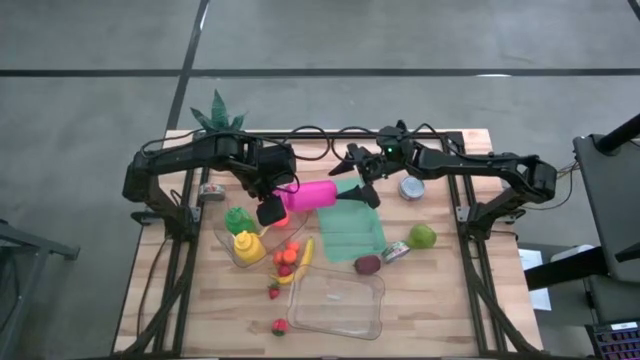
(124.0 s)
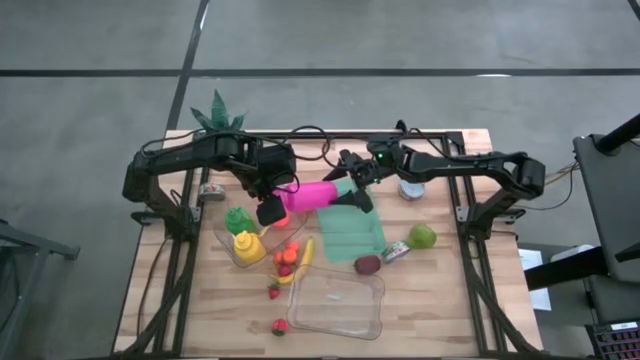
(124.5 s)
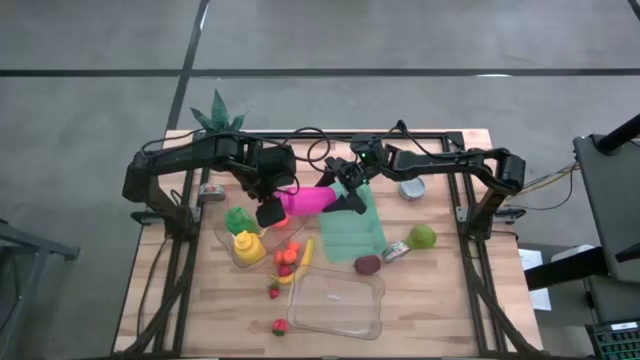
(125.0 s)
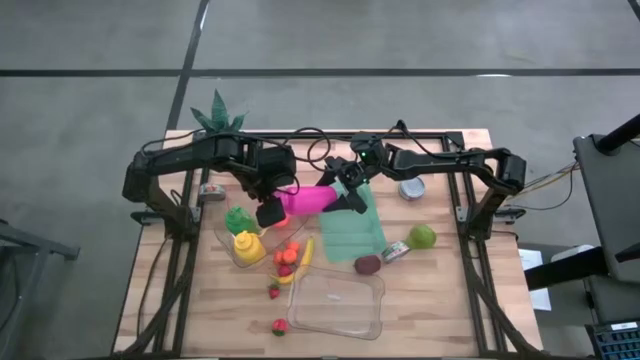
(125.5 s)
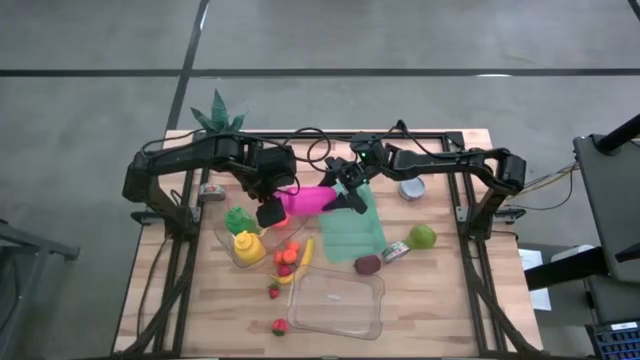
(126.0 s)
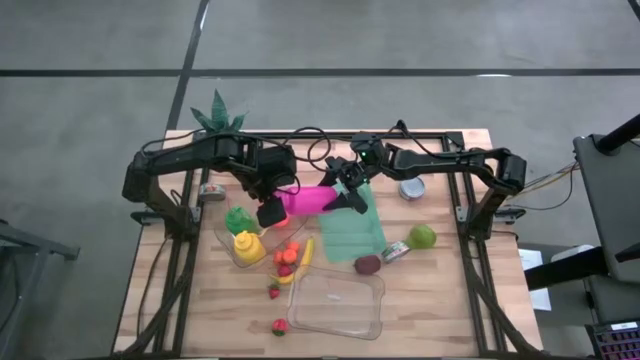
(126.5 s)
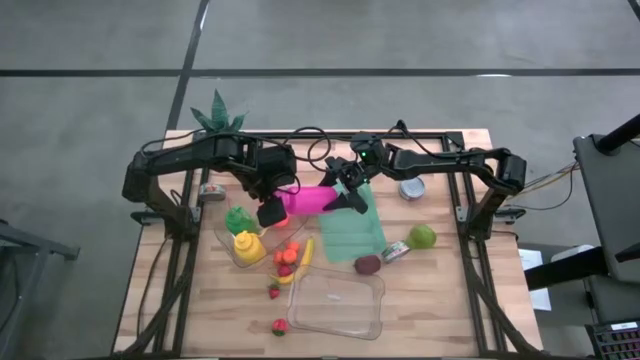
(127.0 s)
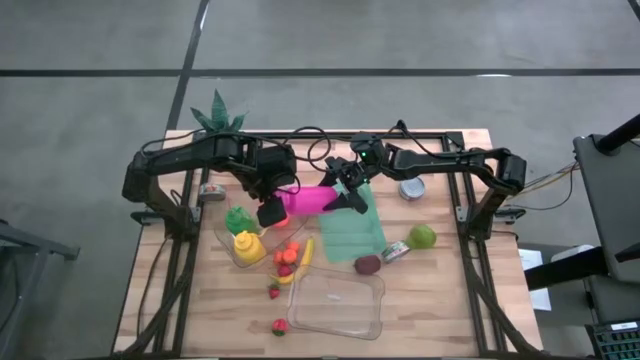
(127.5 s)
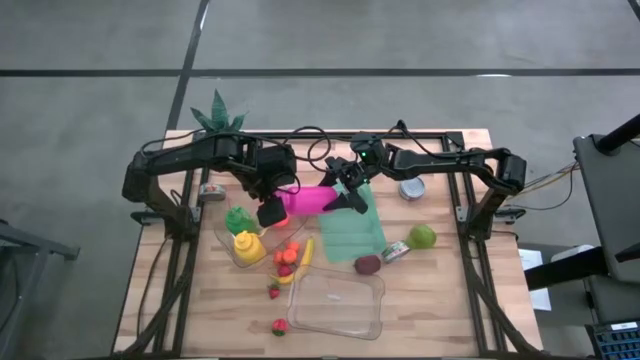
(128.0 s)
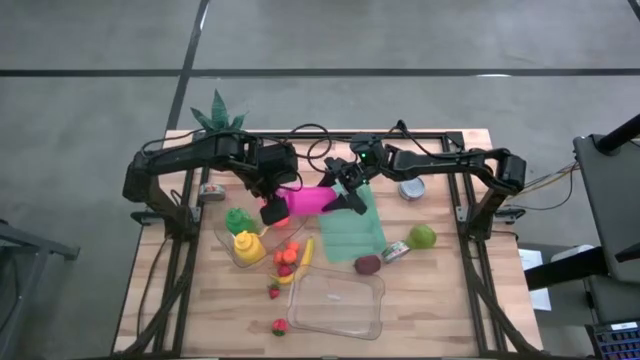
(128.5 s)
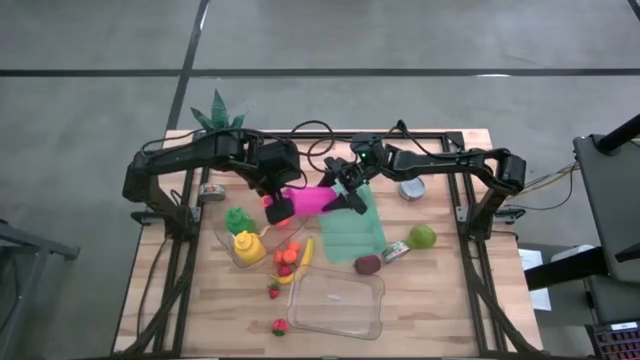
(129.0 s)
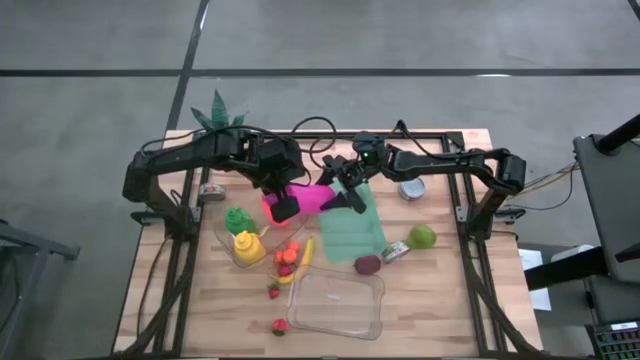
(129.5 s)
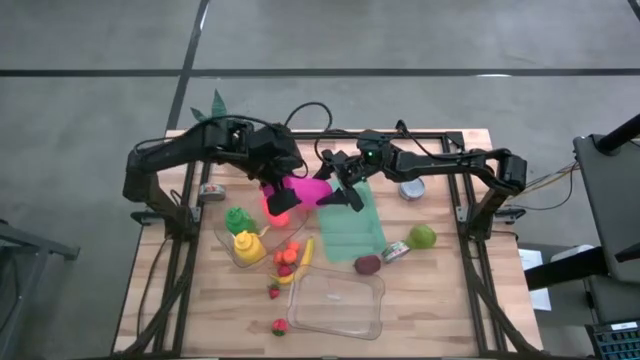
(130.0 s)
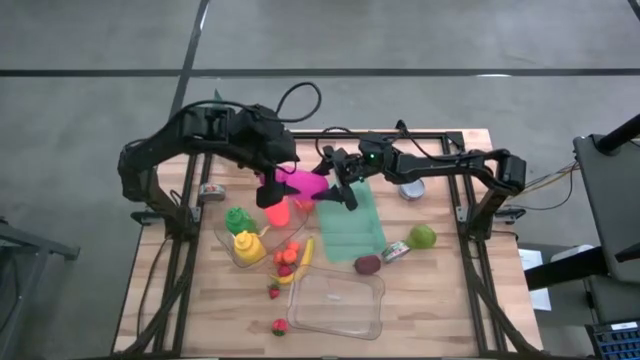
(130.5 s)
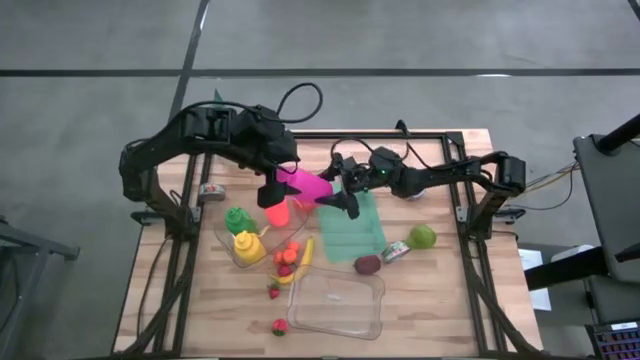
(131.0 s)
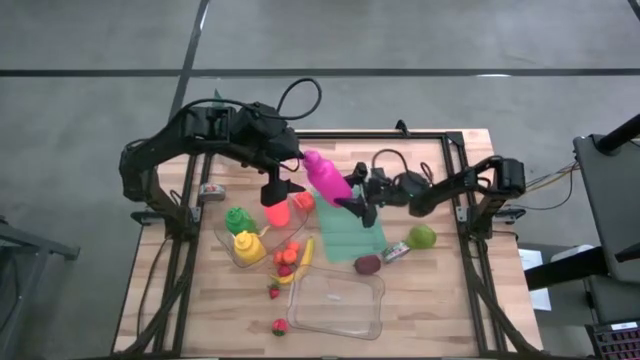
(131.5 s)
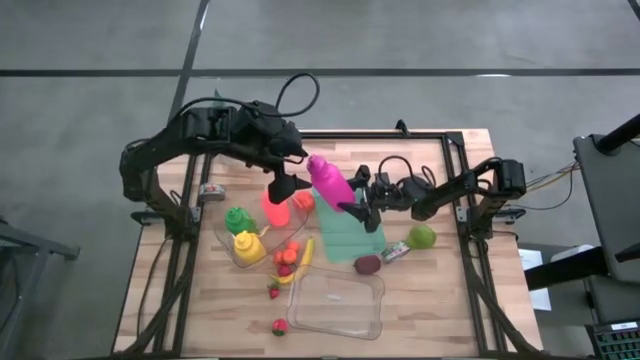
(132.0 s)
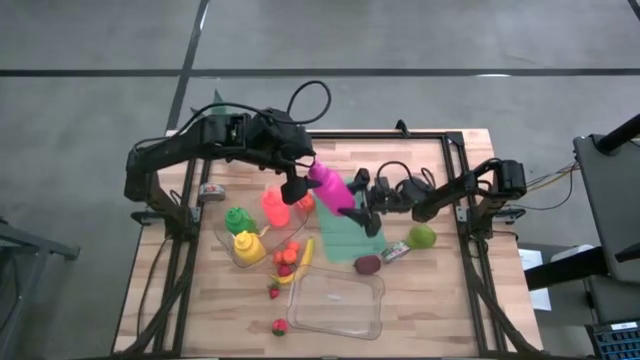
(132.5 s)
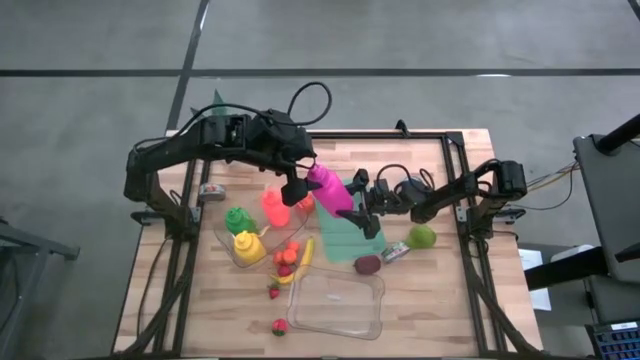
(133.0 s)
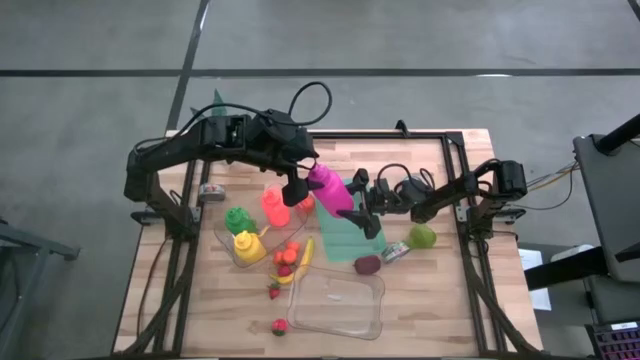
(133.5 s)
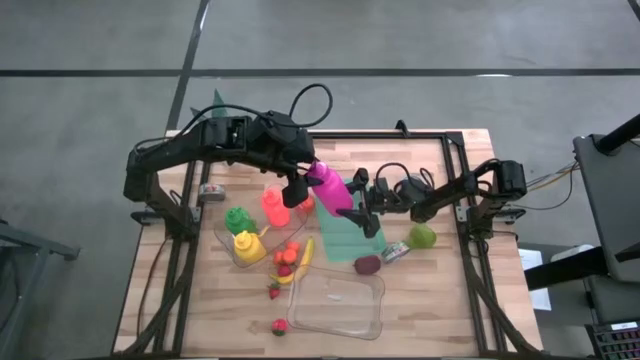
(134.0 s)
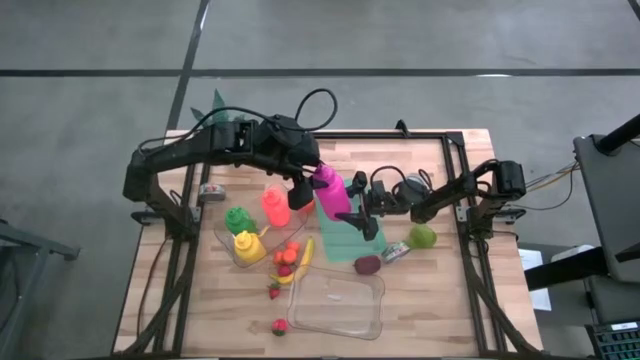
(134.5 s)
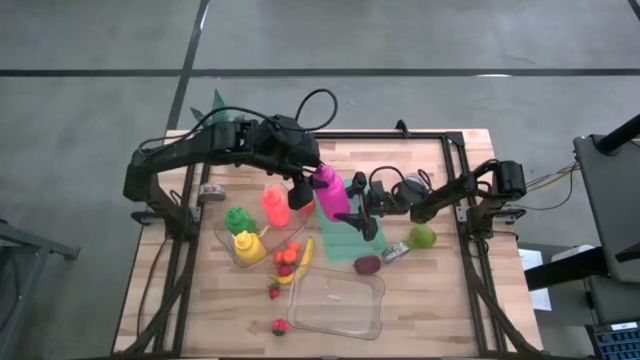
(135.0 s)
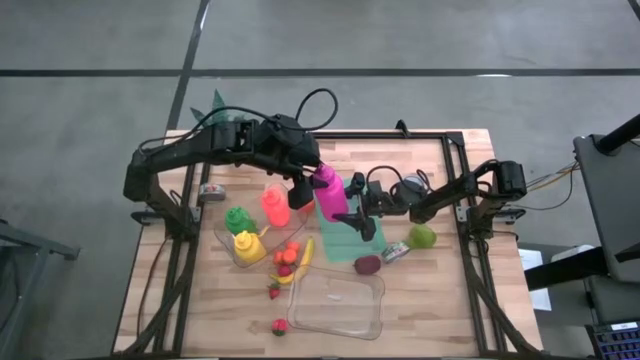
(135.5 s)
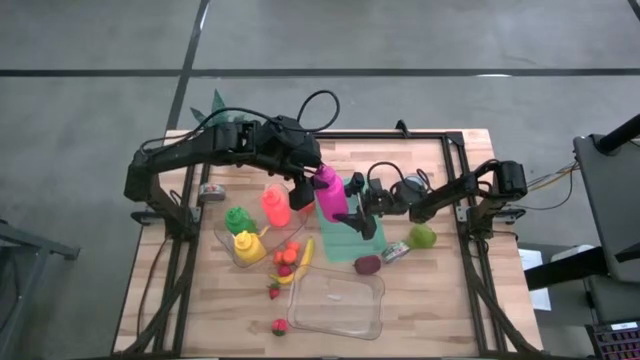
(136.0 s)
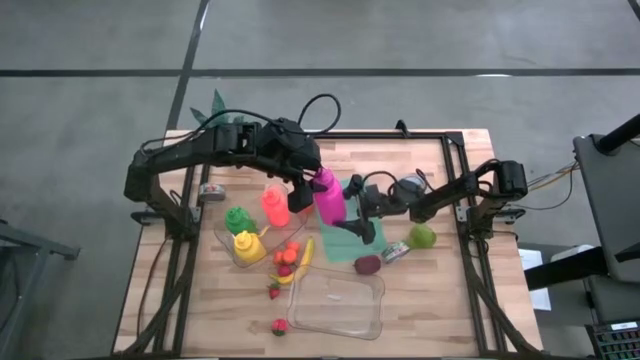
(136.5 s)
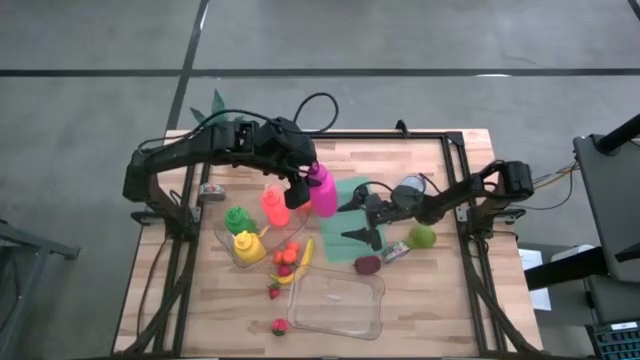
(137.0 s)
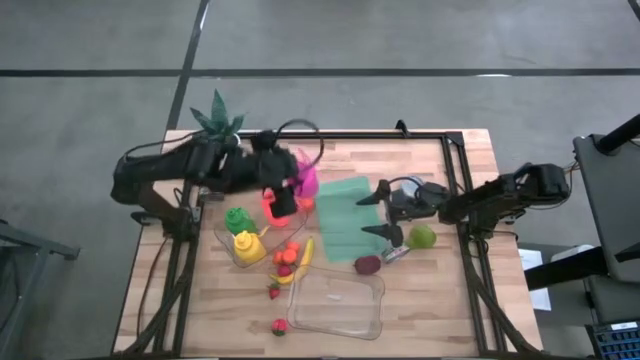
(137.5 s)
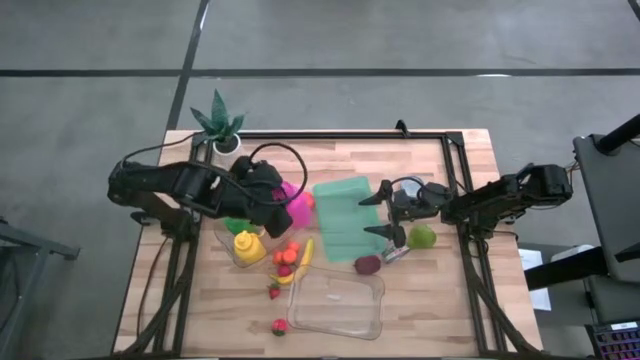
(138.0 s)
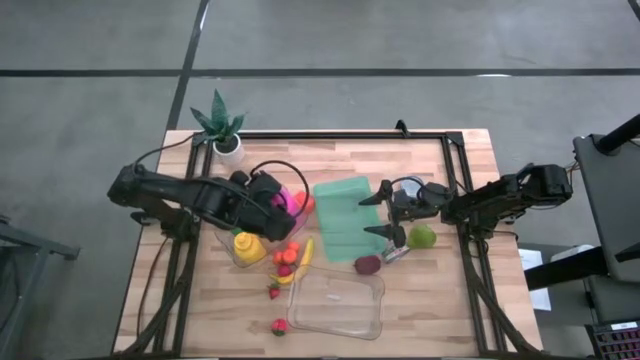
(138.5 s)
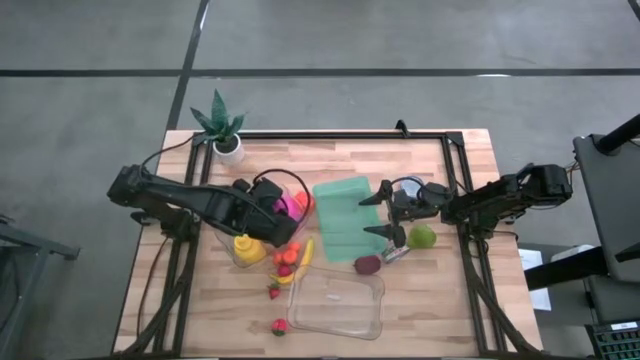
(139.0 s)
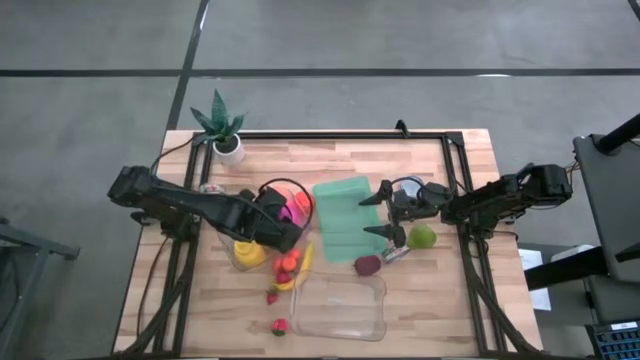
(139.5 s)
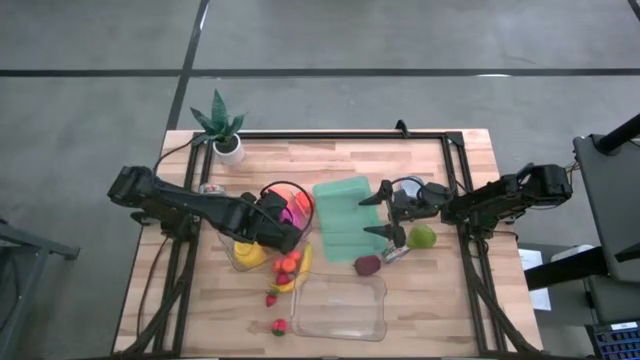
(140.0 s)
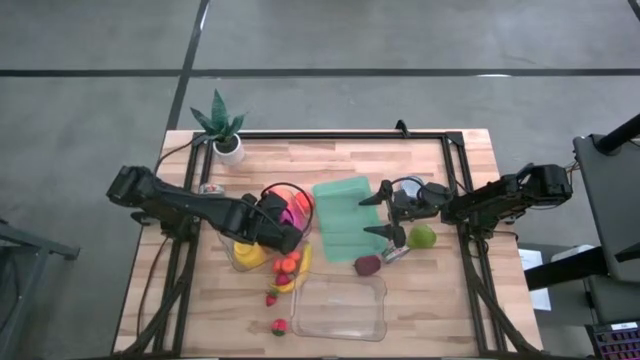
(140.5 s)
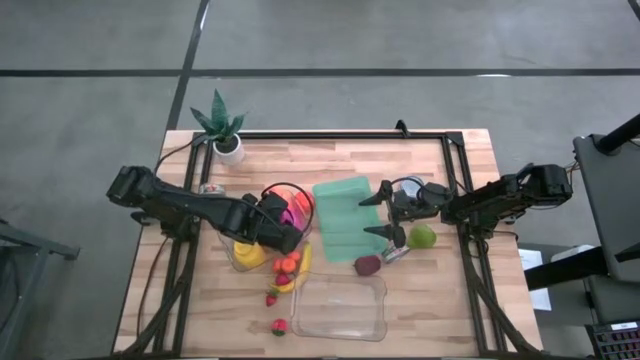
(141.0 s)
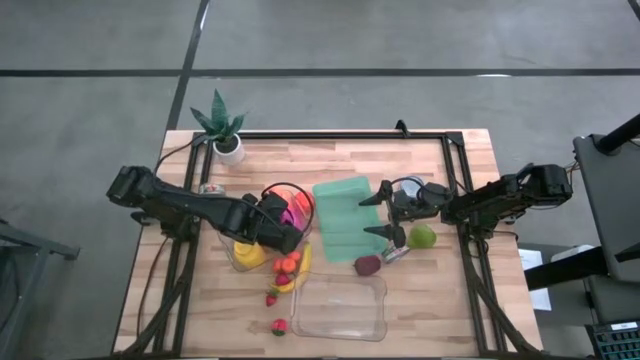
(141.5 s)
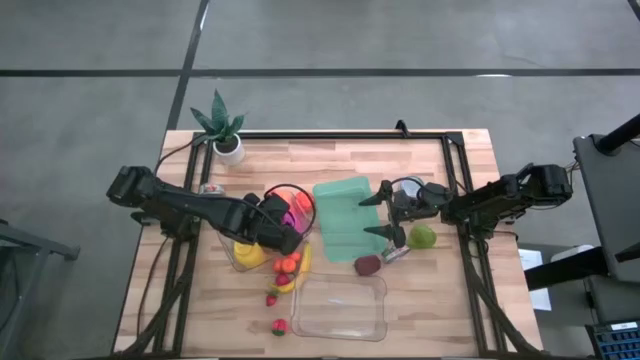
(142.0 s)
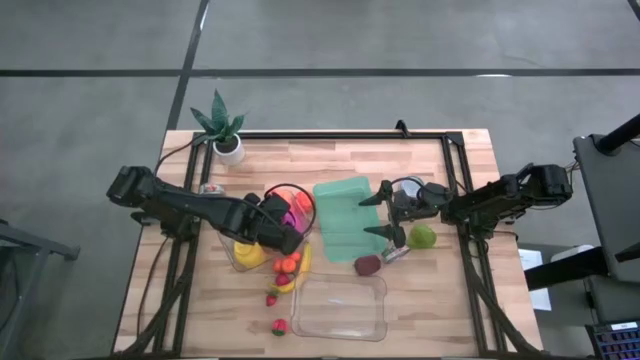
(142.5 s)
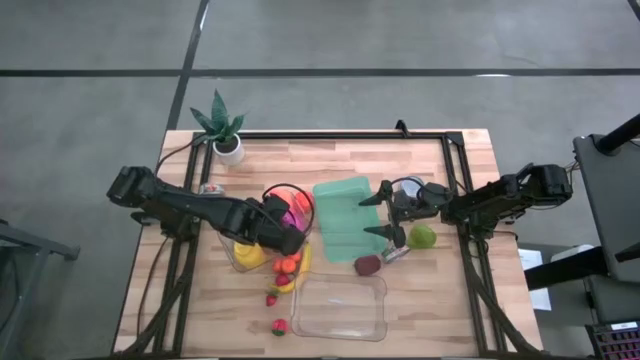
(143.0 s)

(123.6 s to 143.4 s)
Task: Pick & Place Food Item
Put the purple water bottle into the top transparent bin

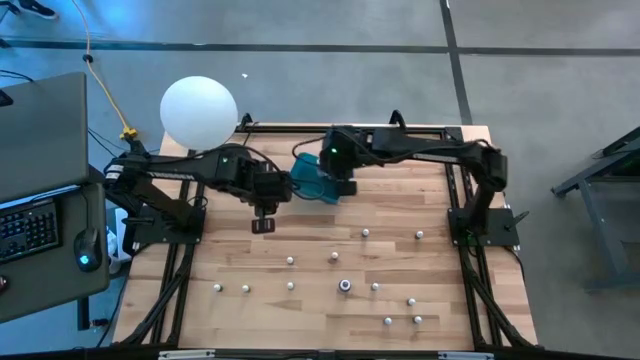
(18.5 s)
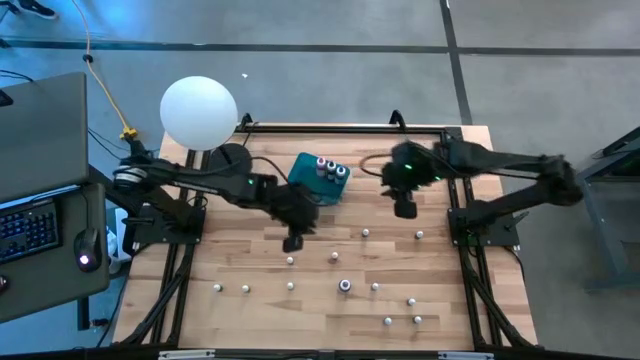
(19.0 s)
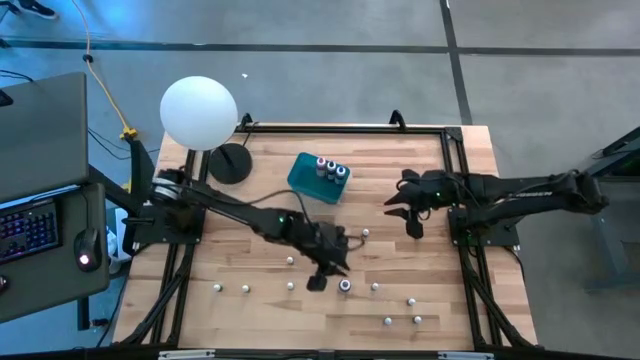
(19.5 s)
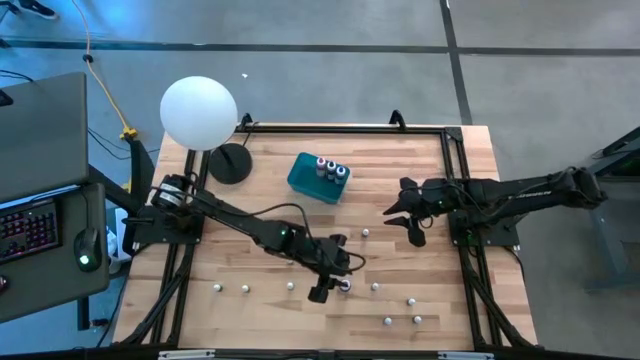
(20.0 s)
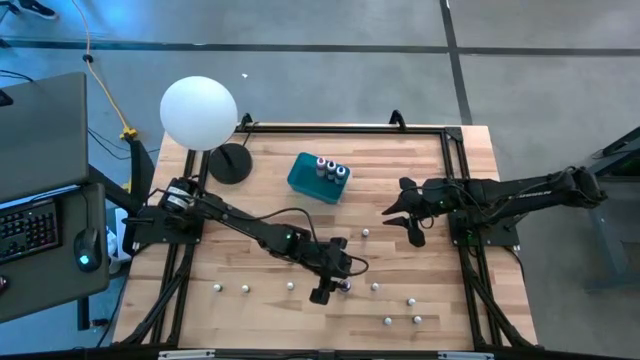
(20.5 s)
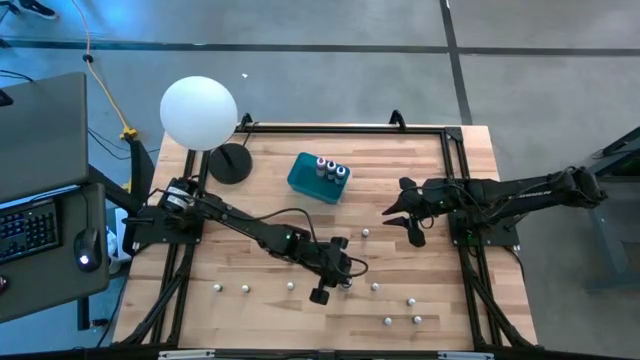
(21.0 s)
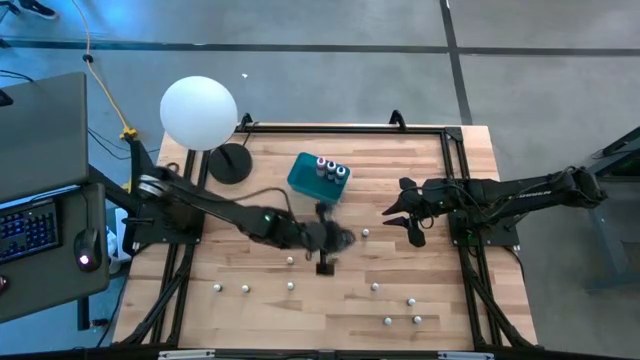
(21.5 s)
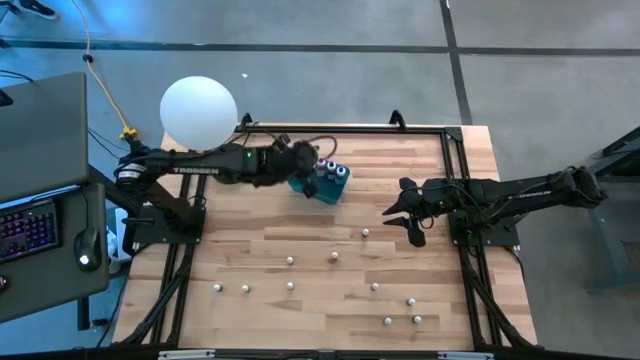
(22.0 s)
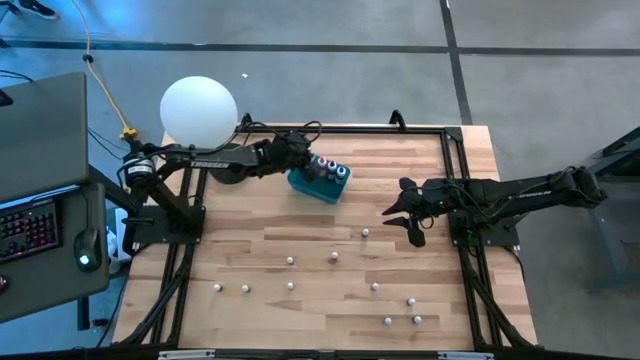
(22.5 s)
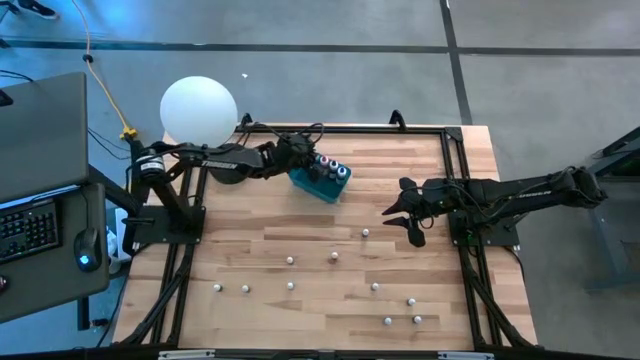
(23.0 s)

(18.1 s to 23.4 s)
Task: Pick & Place food coloring
Put the big purple food coloring bottle into the blue bin
